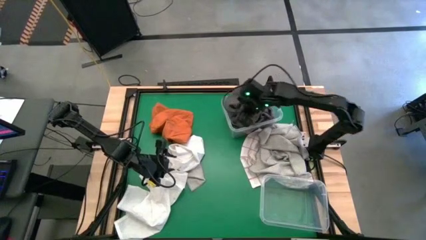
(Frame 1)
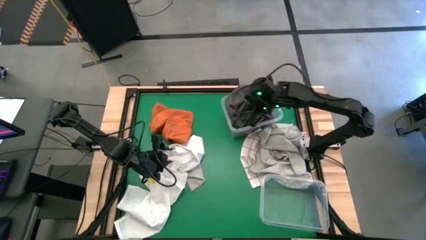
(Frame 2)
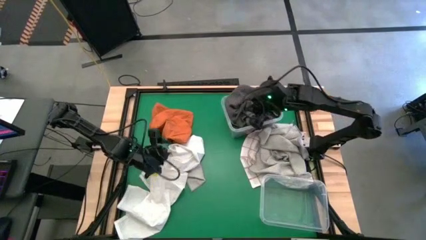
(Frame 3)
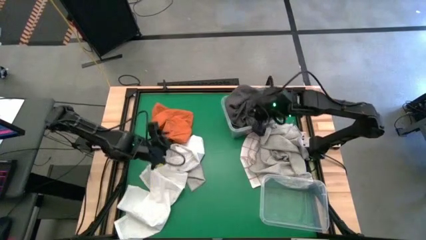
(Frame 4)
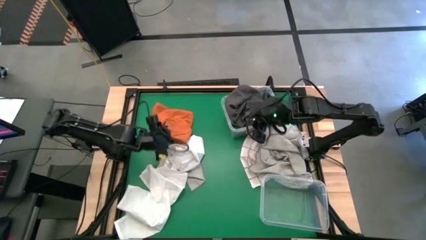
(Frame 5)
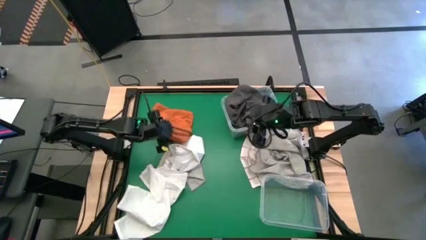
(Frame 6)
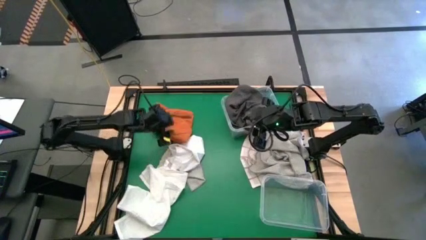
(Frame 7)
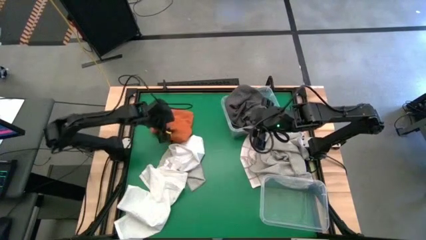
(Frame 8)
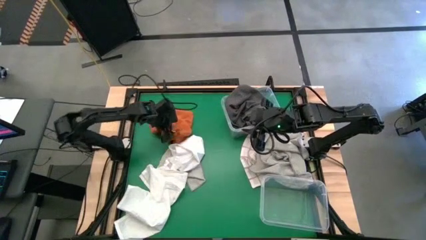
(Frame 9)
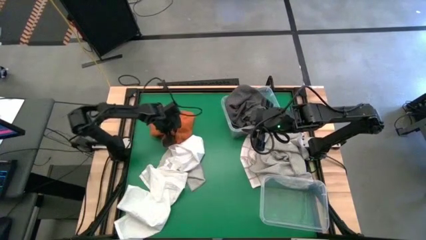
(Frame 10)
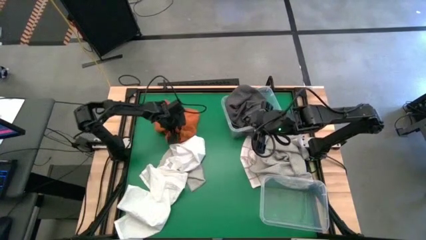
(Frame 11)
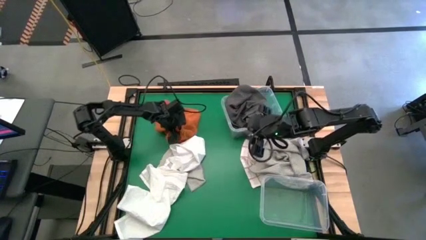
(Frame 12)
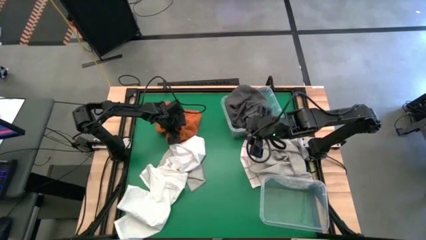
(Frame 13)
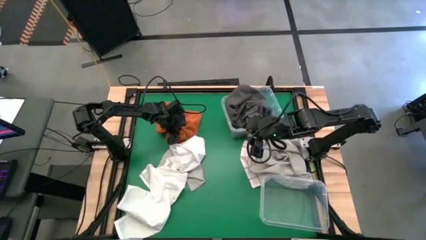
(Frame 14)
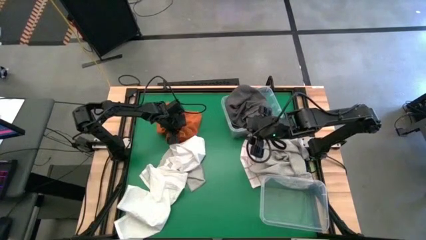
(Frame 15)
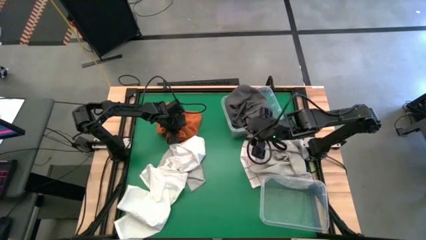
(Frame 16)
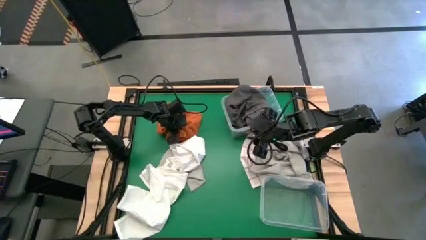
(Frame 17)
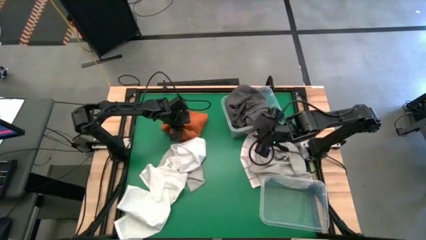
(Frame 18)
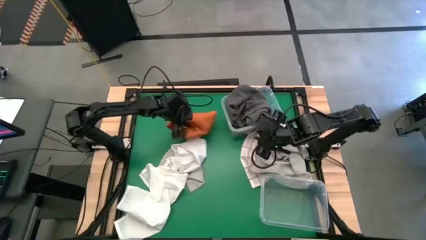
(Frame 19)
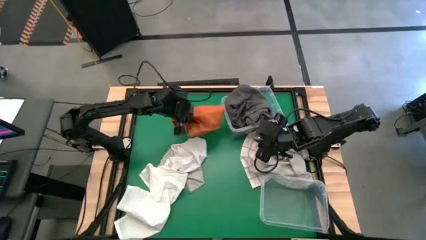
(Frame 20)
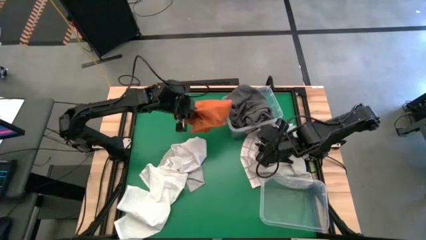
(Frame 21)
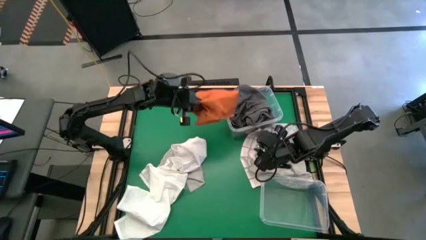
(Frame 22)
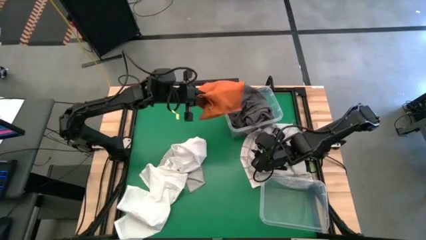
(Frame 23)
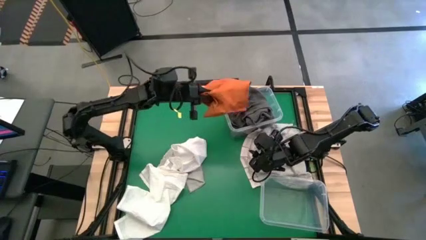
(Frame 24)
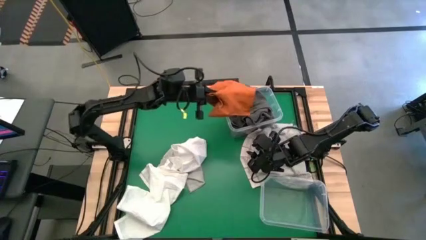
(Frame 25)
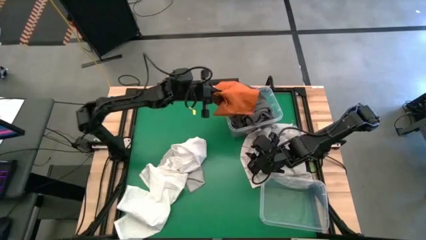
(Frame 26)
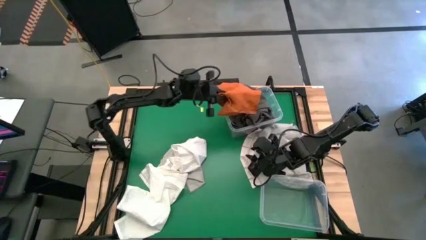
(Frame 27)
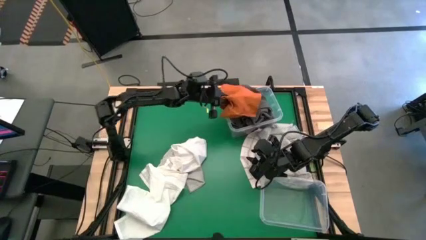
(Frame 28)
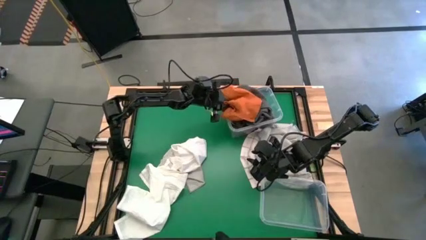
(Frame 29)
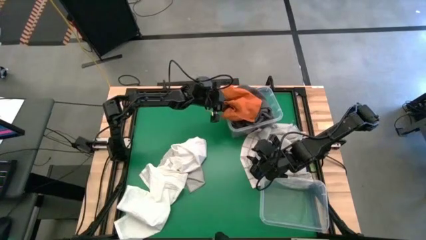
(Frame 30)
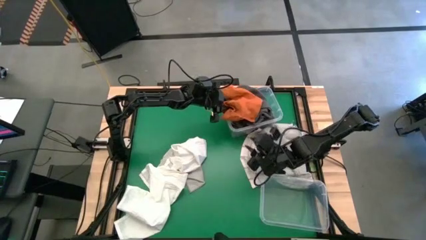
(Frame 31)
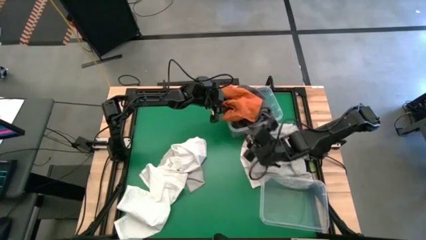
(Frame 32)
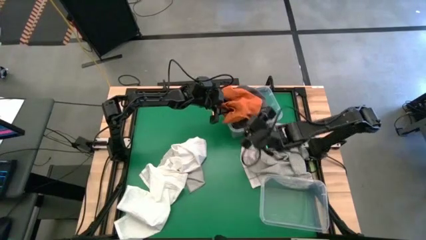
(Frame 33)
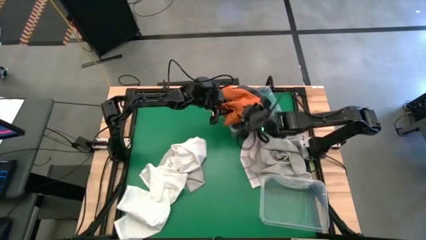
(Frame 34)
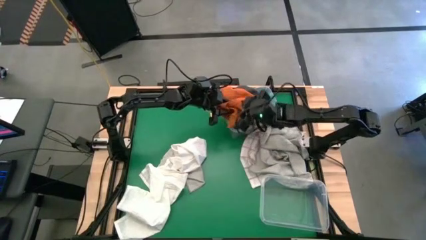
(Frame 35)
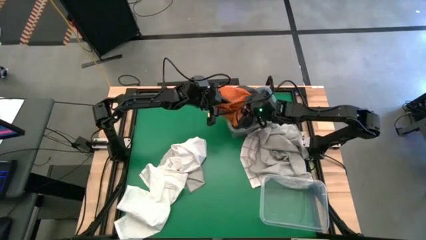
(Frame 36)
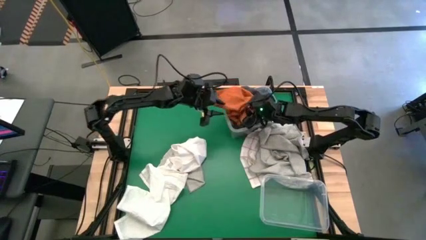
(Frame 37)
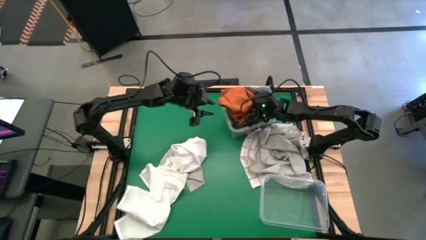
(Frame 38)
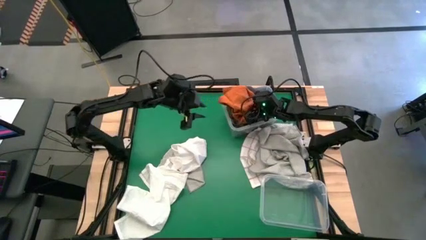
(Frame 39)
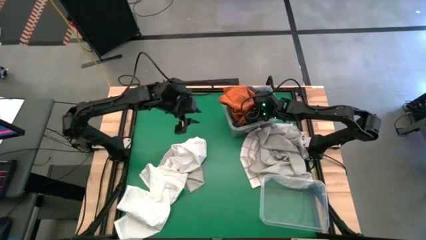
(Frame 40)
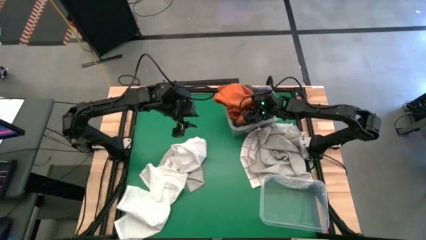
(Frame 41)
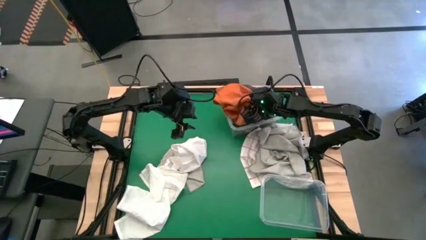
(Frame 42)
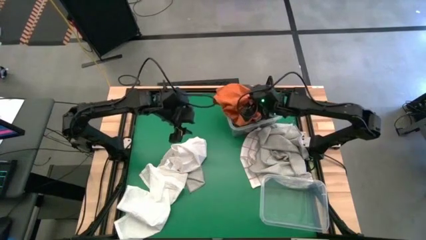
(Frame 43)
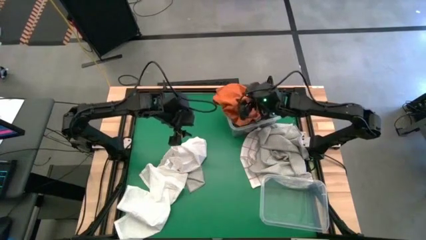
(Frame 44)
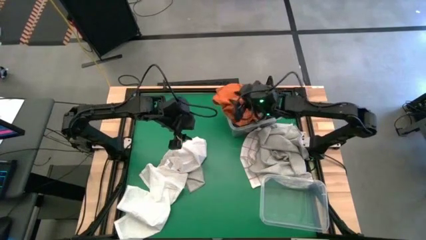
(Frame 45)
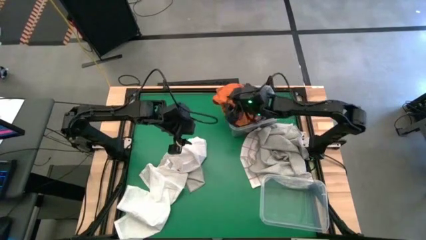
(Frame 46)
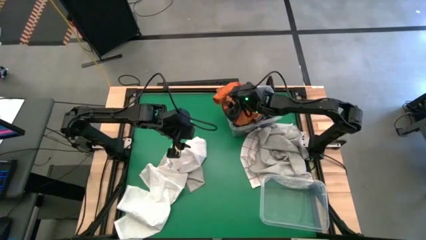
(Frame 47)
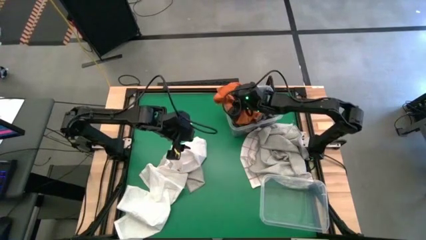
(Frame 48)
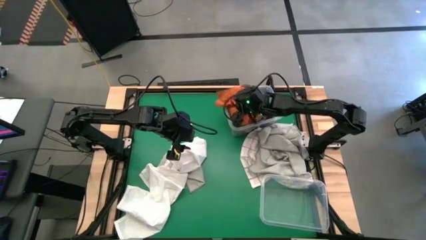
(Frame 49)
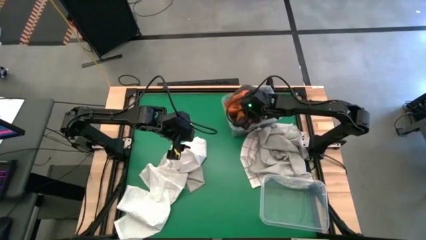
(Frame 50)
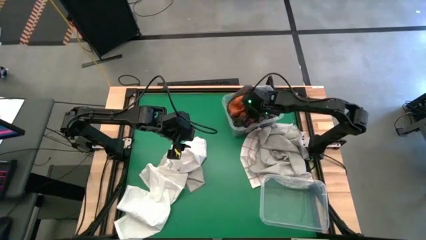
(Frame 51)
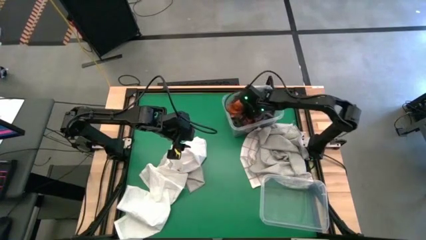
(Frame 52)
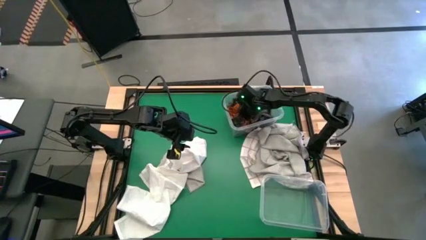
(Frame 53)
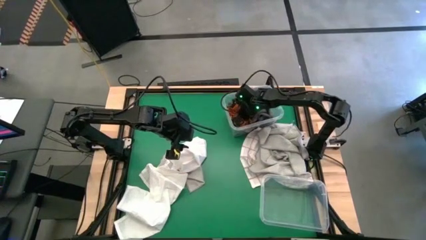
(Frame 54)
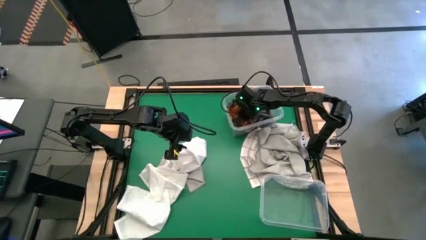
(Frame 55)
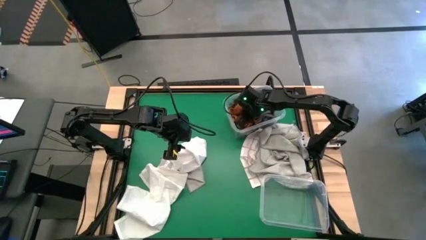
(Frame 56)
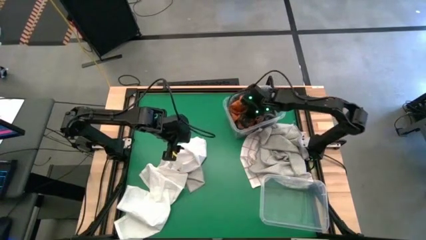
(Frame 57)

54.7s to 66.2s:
Task: Sort towels by color in basket
Put the orange towel into the top transparent bin
